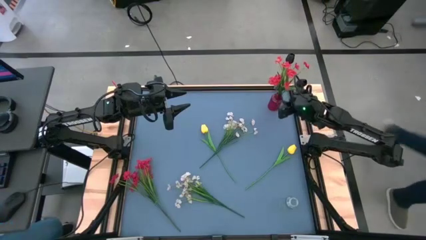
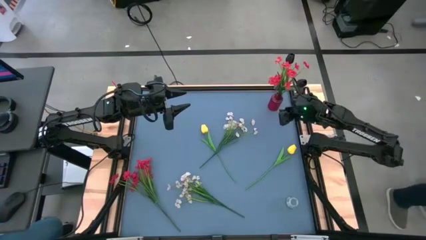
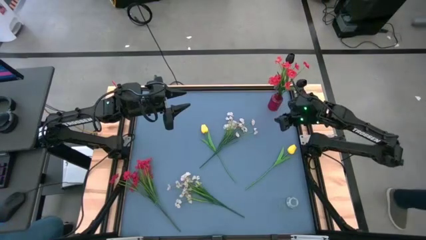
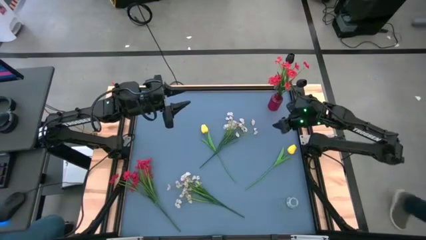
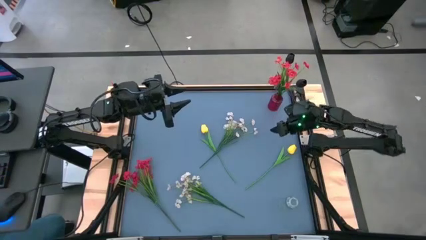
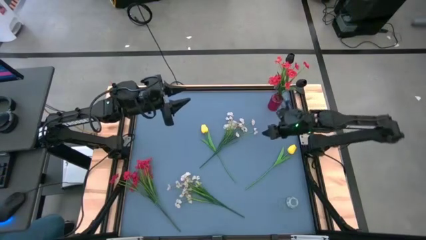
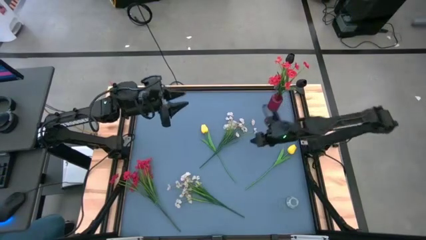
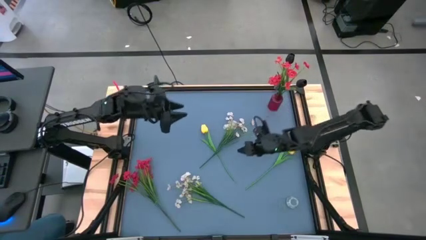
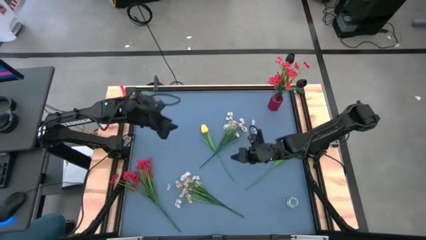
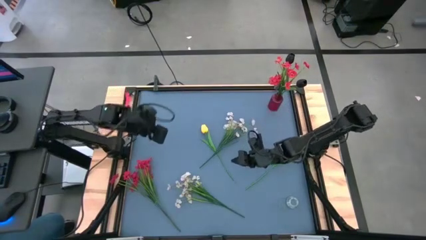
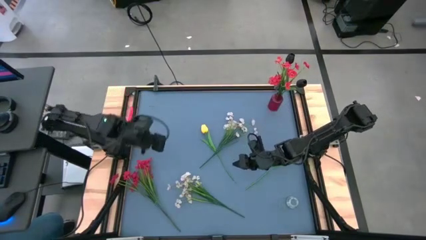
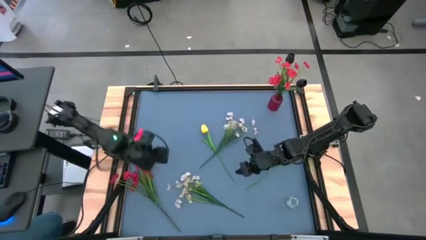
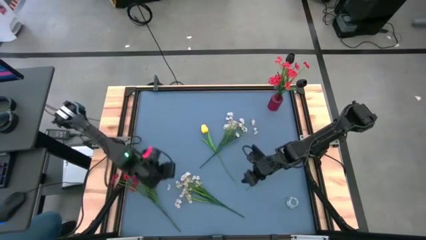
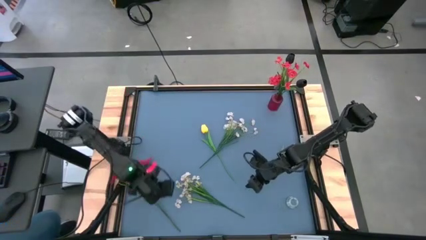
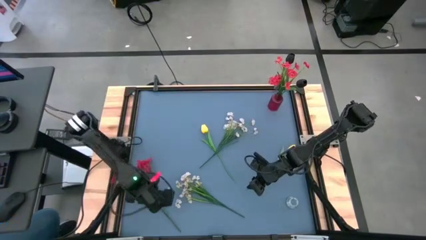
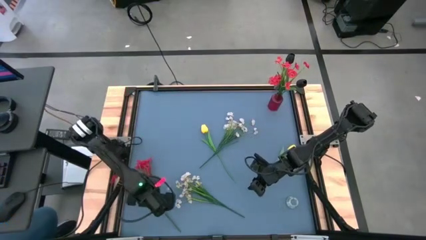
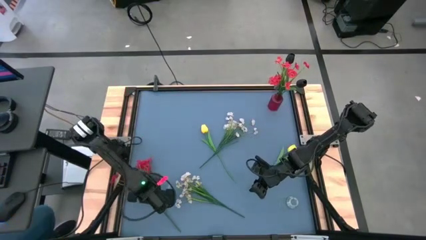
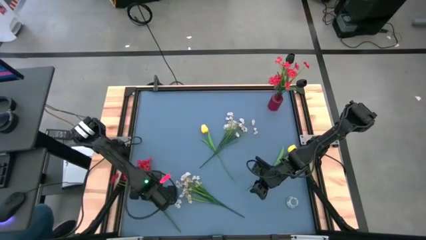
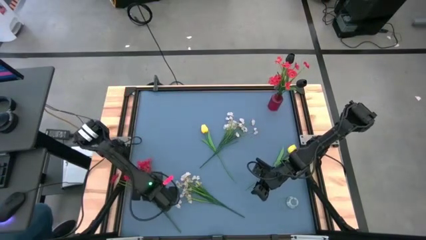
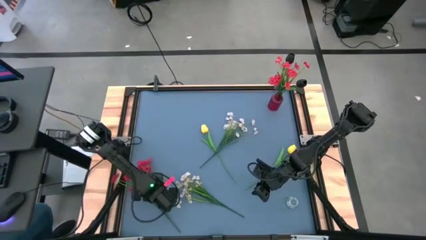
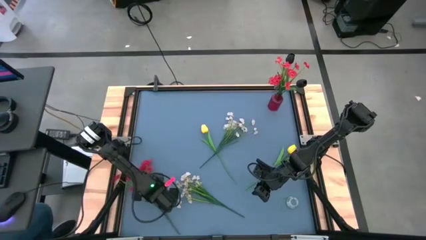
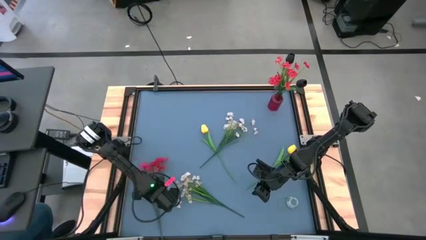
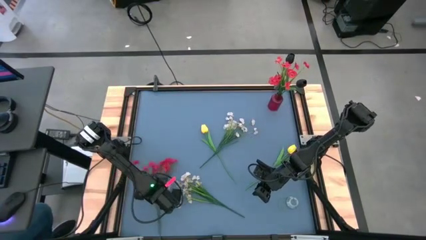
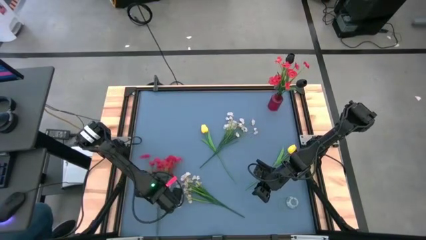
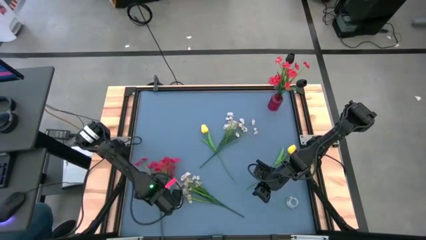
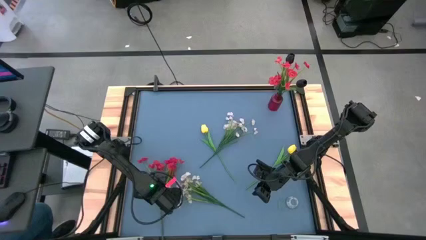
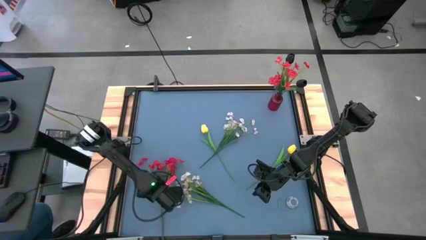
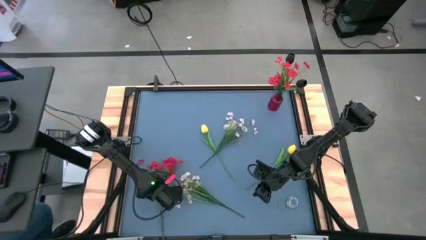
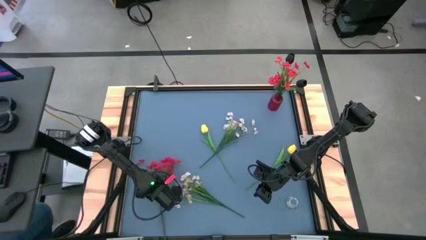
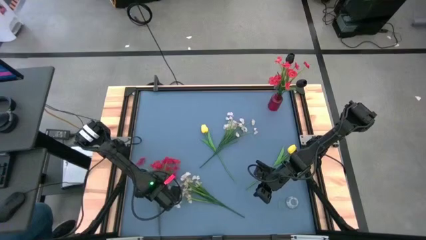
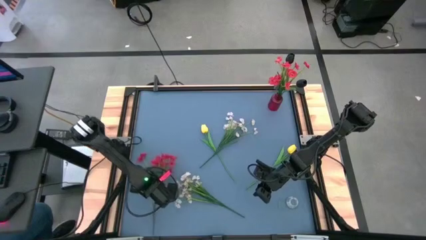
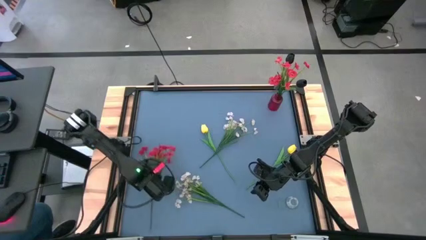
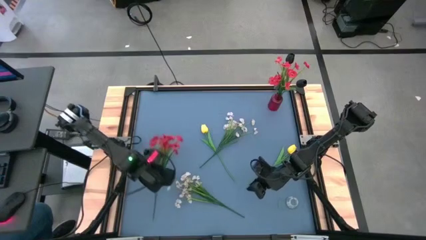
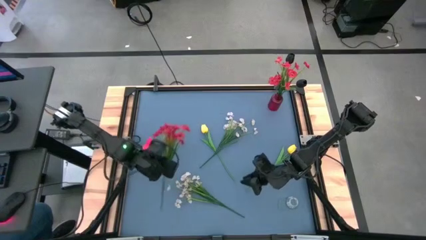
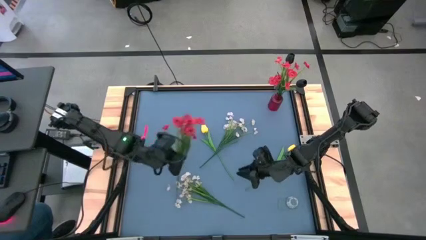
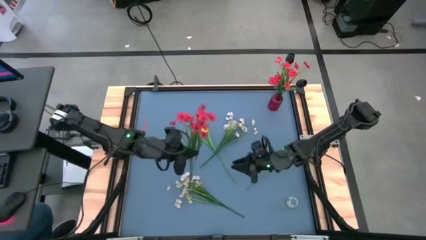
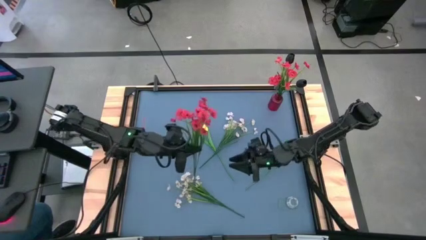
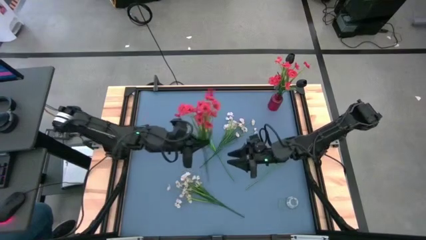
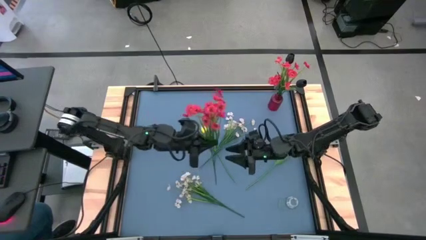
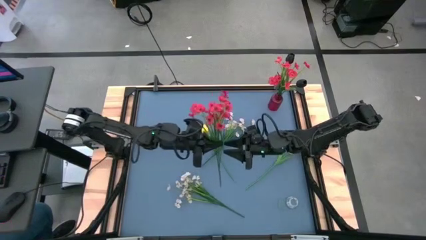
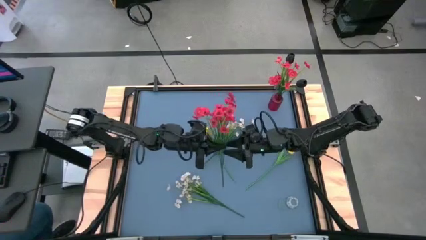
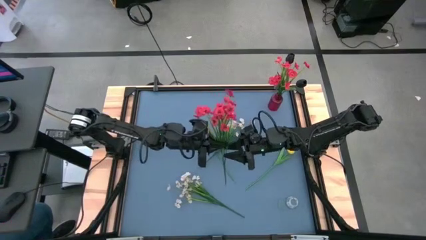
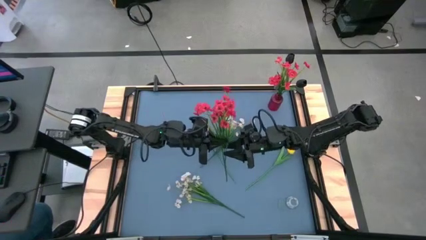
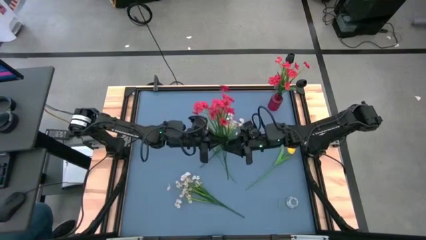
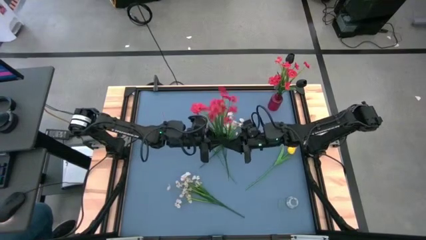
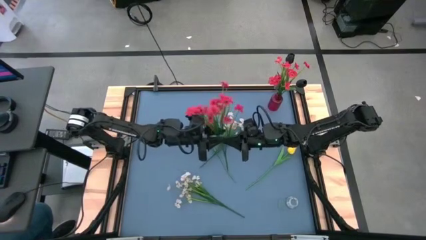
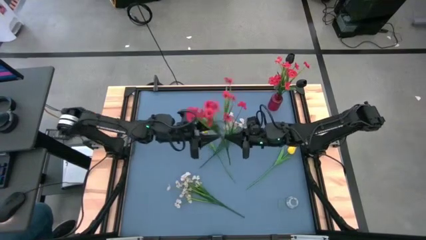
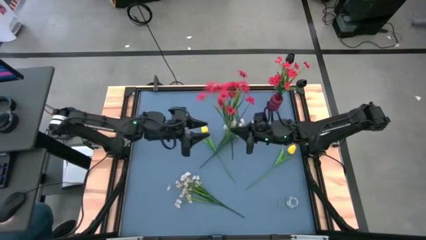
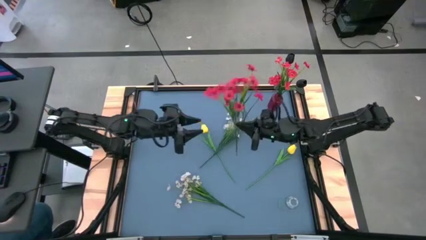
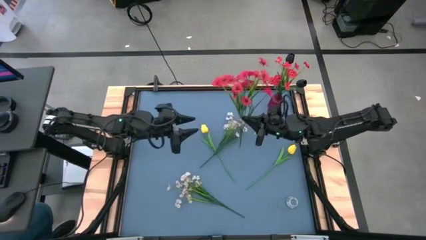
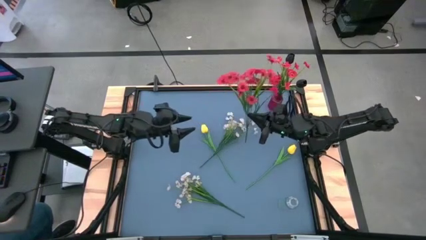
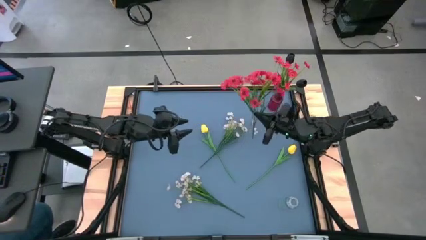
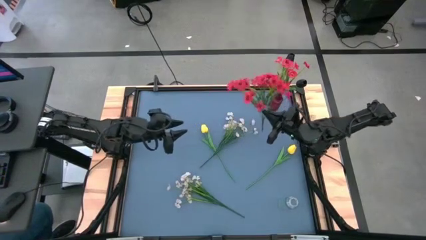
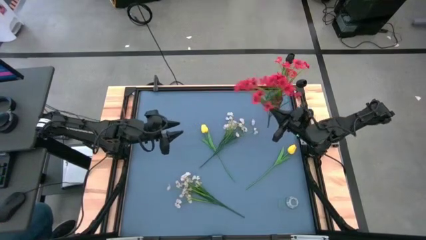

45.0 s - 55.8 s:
Task: Sort flowers into vase by color
Put the red flowers into the red glass vase

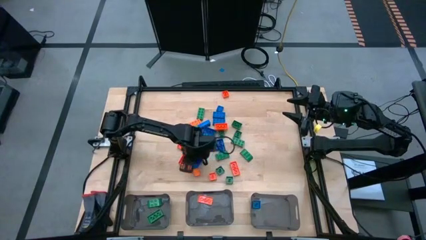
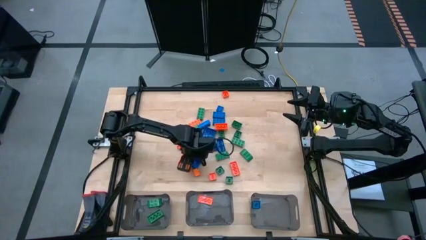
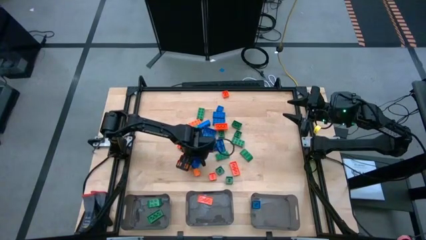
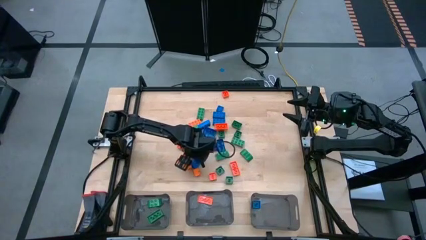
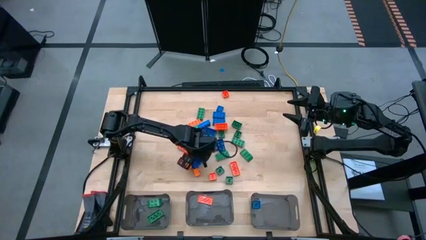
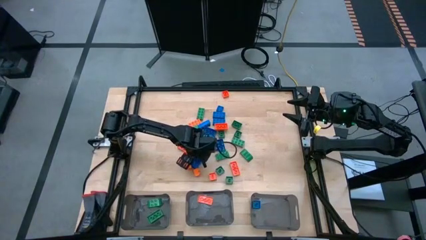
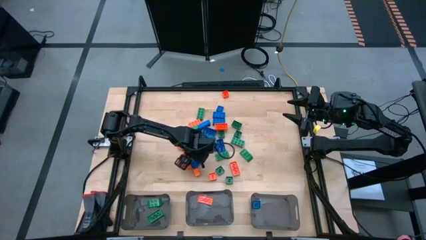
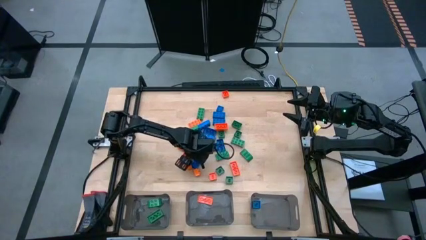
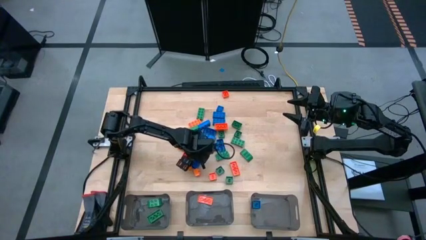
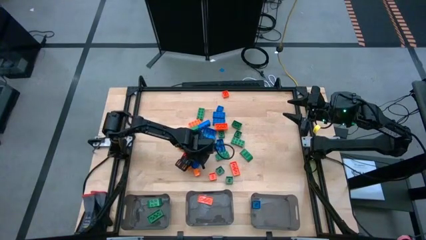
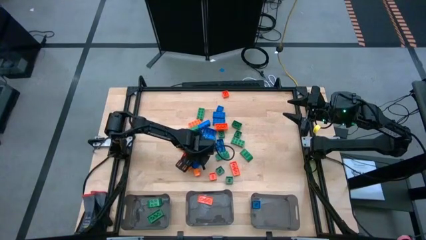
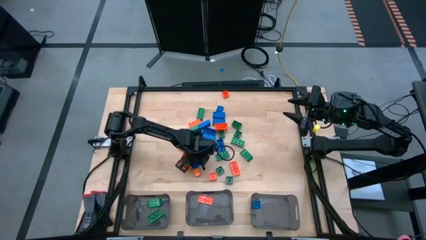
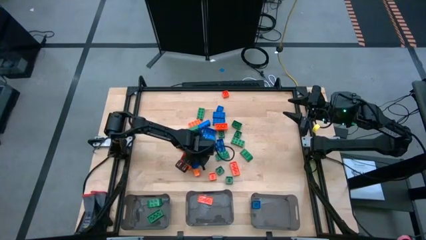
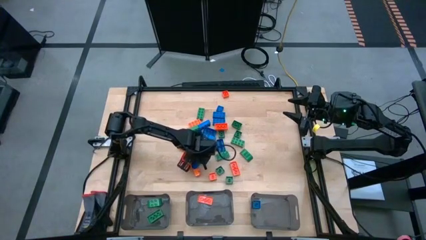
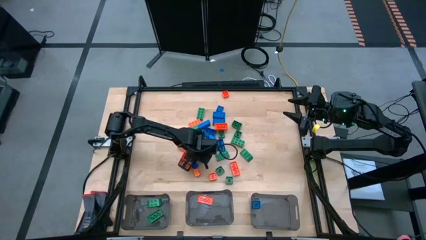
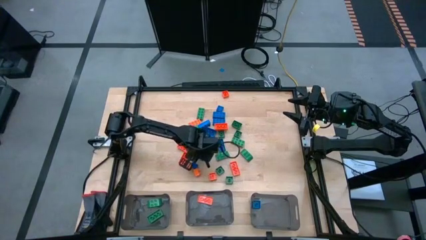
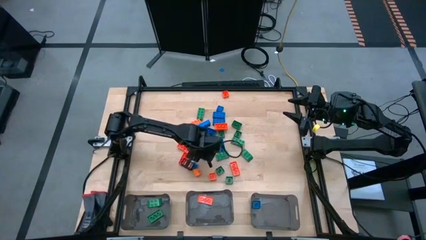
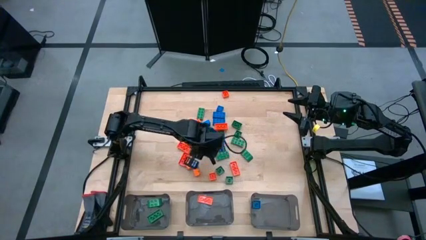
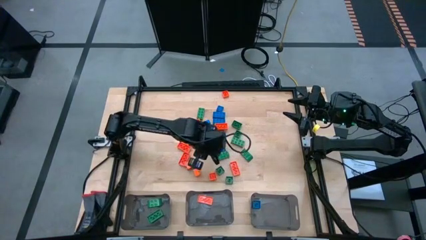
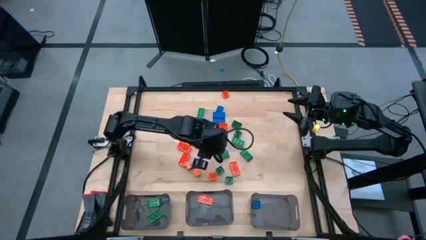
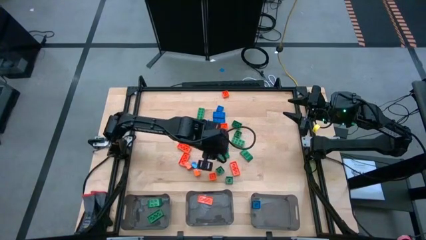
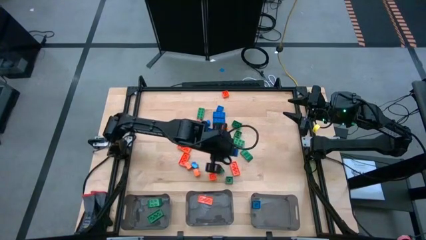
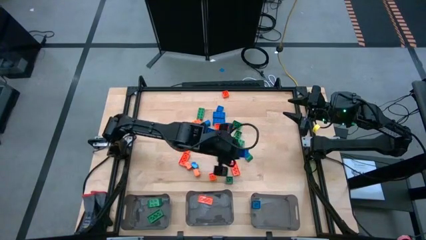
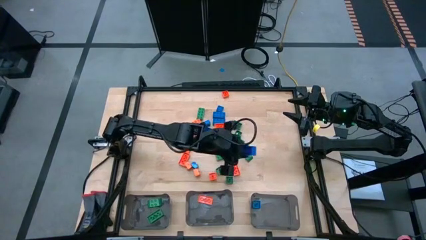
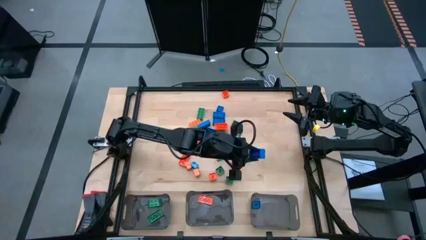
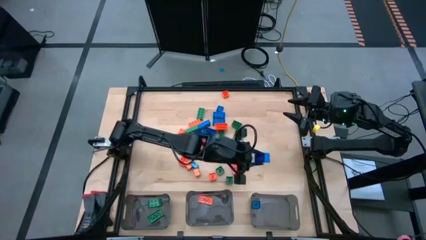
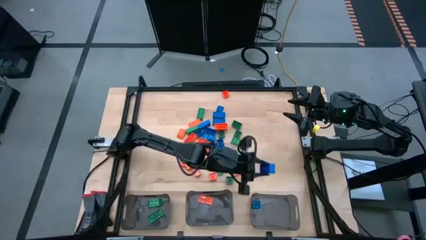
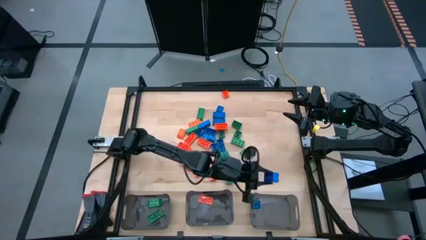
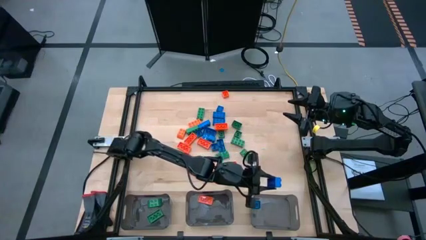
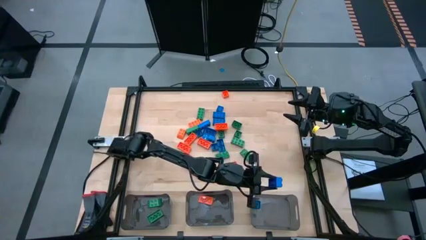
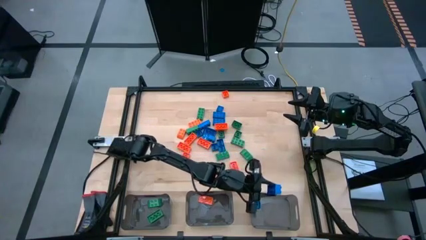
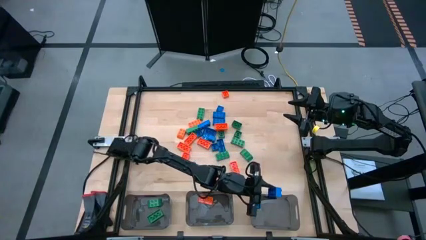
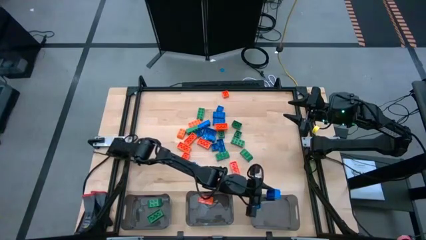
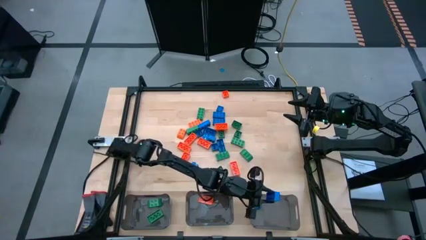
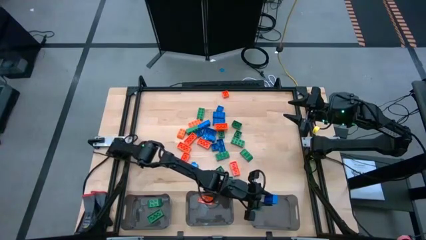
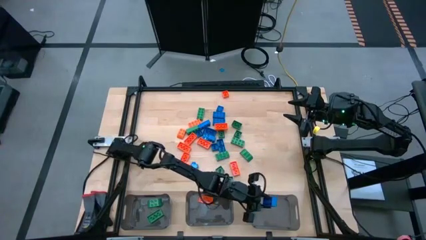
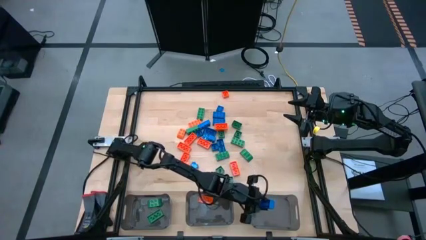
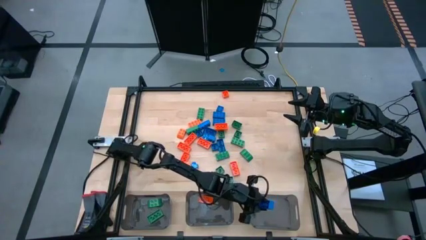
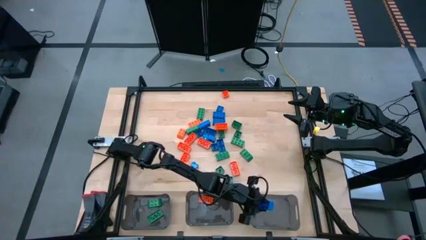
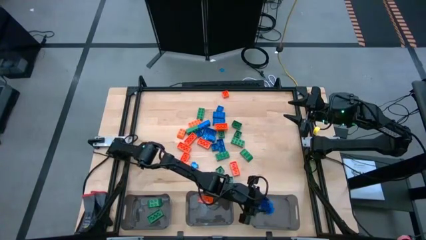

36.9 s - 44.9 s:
Task: Sort blocks
Put the blue game piece into the right black bin
